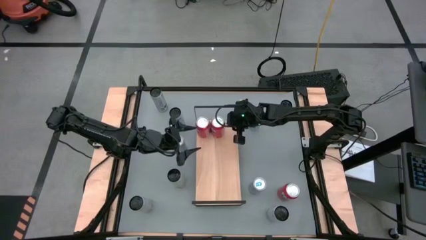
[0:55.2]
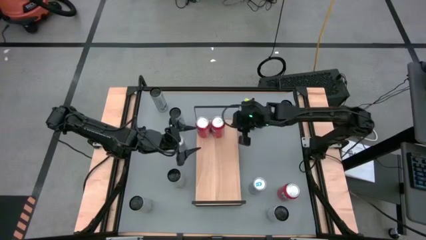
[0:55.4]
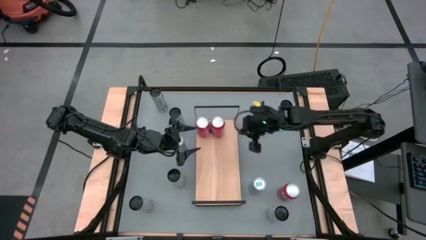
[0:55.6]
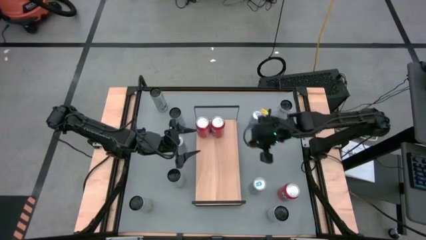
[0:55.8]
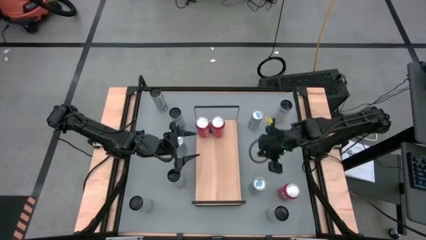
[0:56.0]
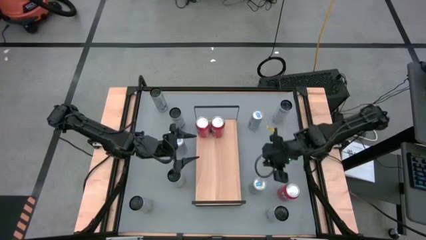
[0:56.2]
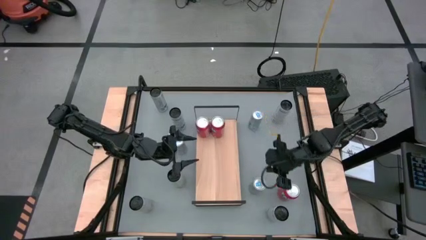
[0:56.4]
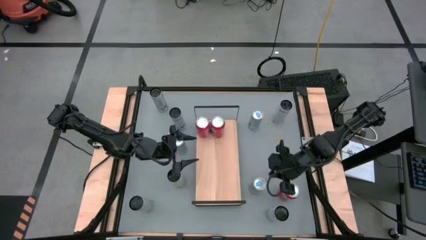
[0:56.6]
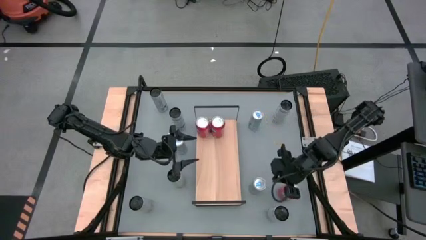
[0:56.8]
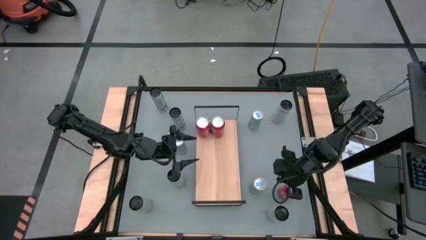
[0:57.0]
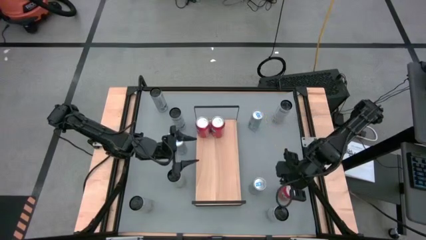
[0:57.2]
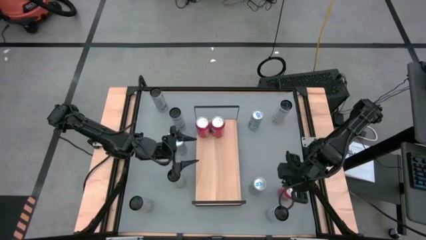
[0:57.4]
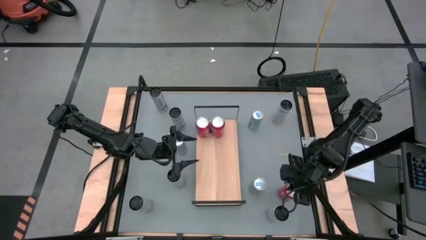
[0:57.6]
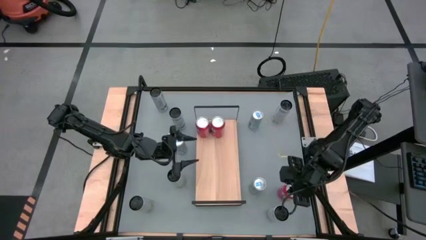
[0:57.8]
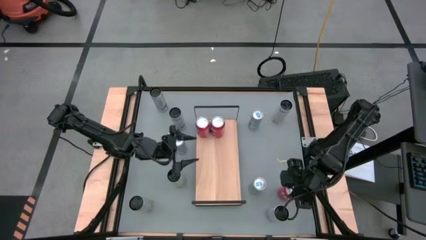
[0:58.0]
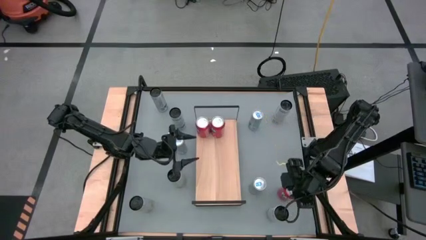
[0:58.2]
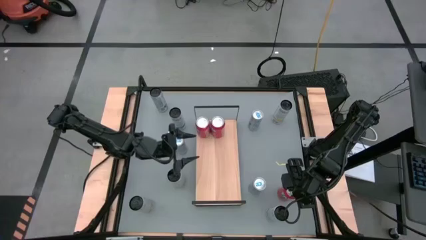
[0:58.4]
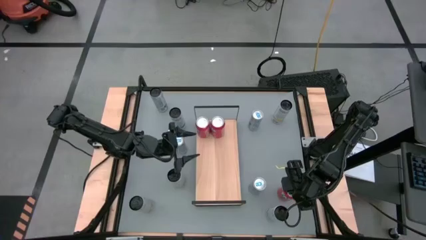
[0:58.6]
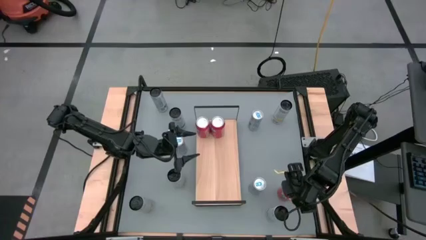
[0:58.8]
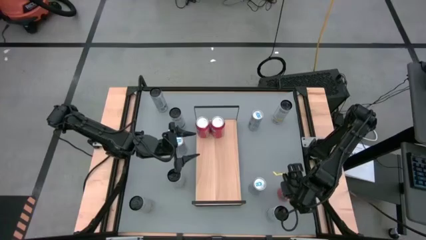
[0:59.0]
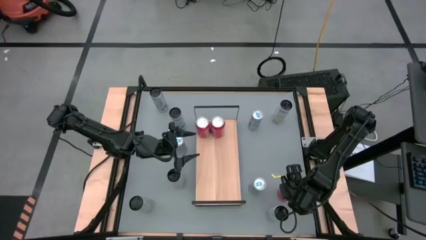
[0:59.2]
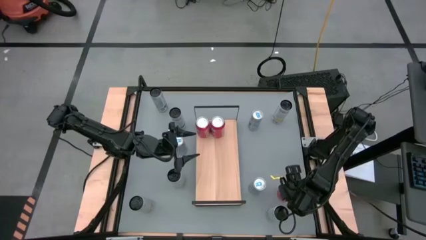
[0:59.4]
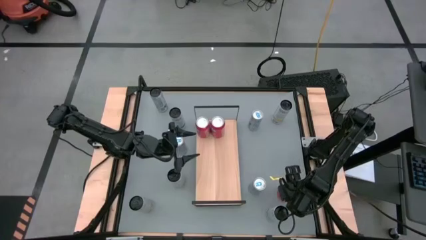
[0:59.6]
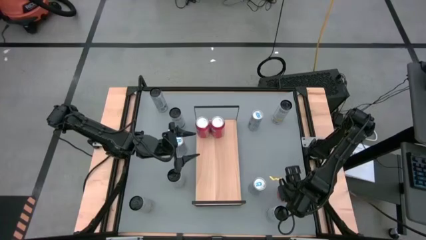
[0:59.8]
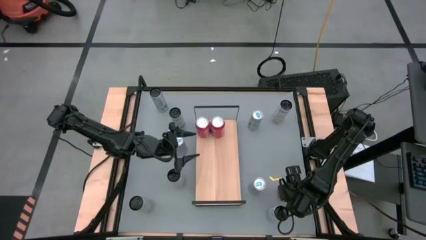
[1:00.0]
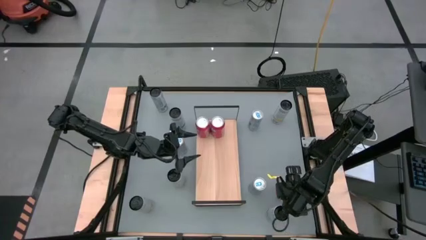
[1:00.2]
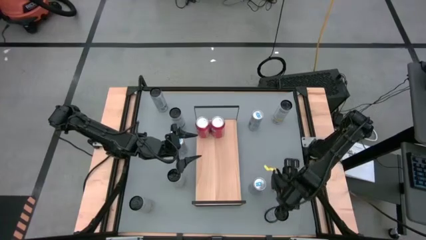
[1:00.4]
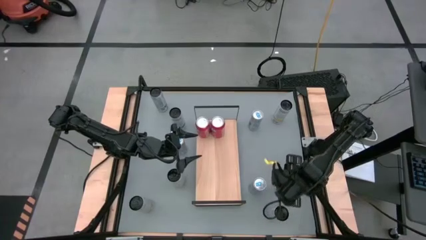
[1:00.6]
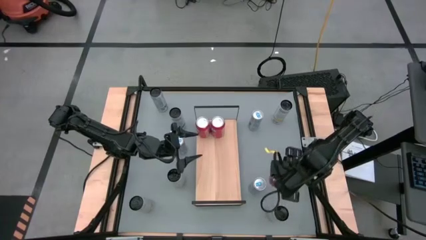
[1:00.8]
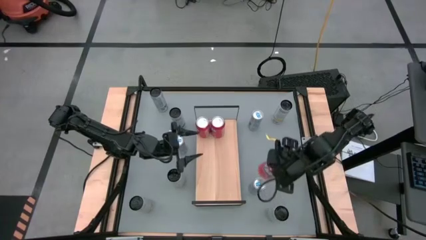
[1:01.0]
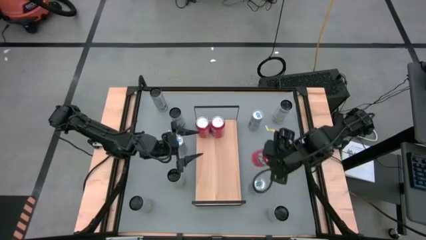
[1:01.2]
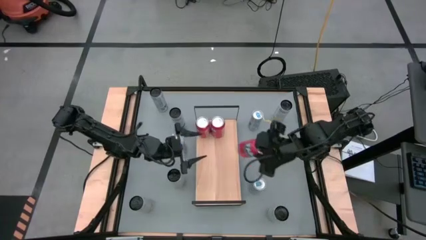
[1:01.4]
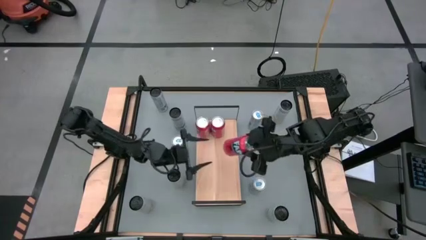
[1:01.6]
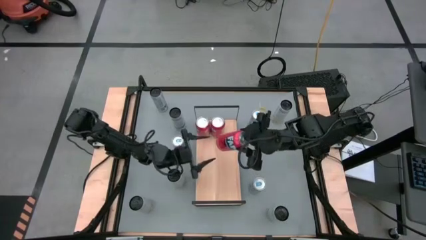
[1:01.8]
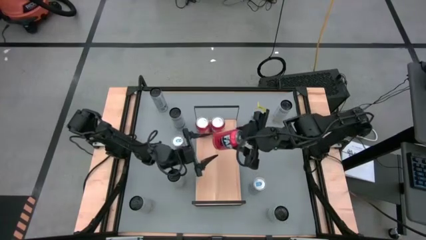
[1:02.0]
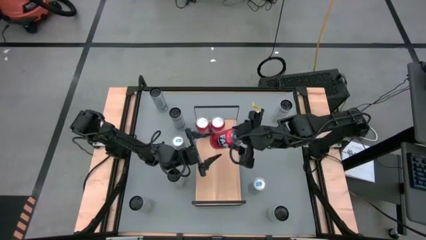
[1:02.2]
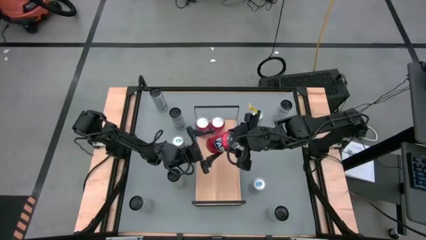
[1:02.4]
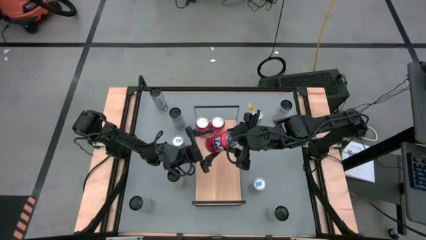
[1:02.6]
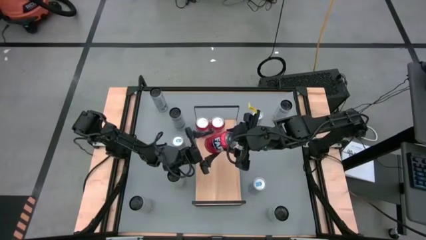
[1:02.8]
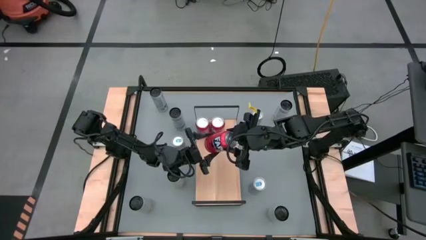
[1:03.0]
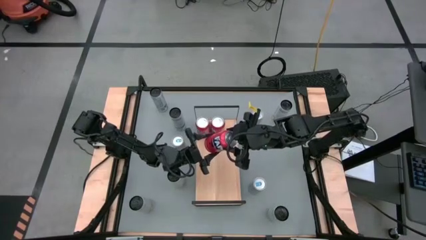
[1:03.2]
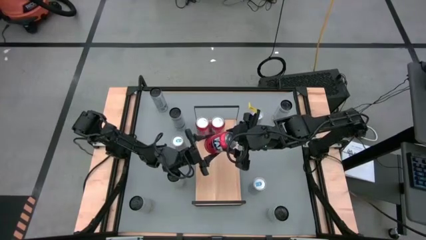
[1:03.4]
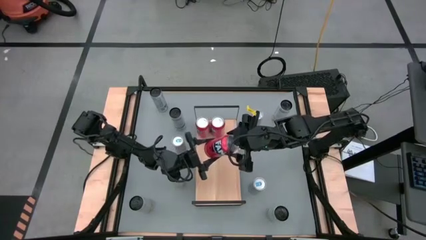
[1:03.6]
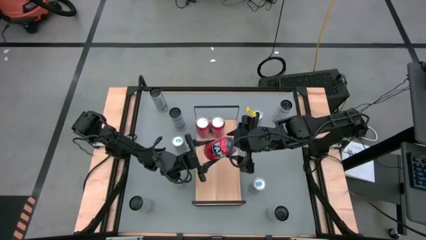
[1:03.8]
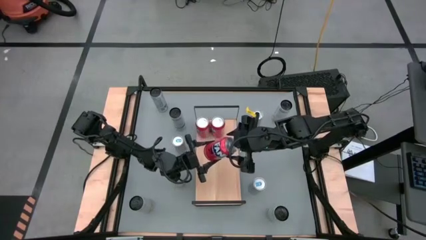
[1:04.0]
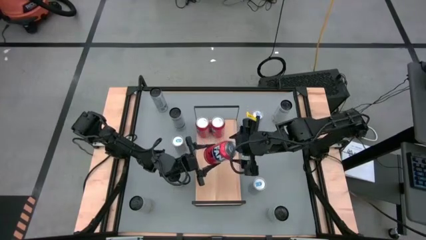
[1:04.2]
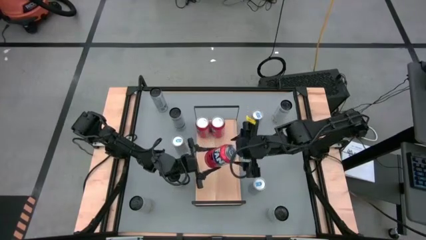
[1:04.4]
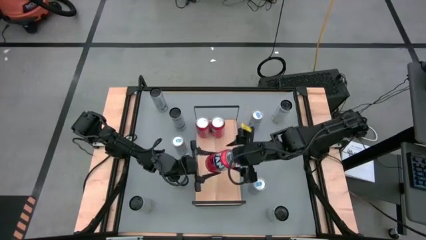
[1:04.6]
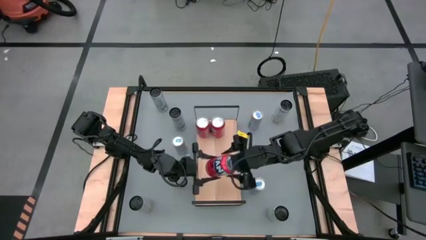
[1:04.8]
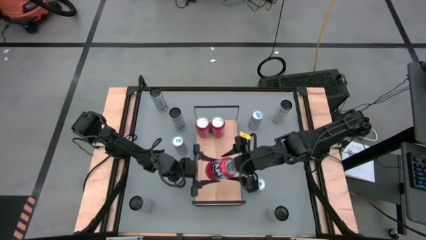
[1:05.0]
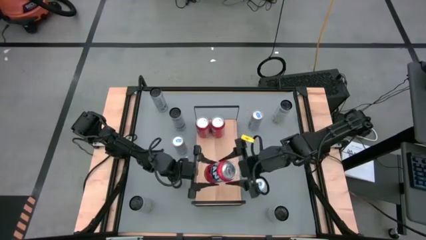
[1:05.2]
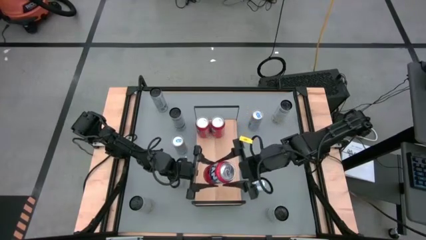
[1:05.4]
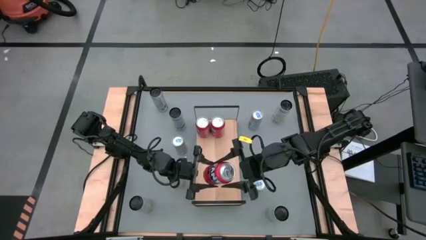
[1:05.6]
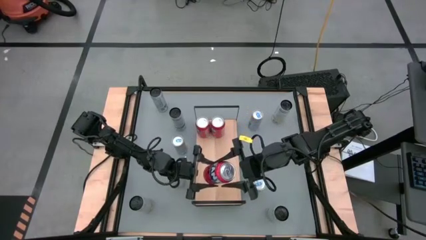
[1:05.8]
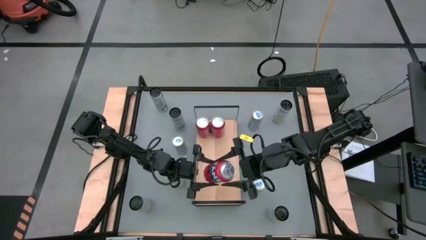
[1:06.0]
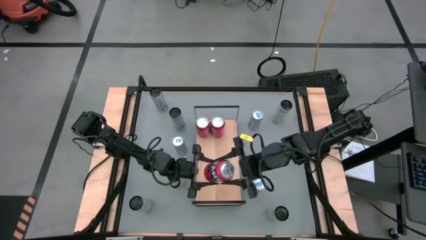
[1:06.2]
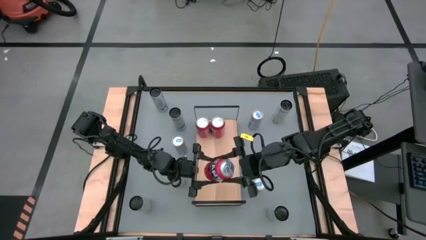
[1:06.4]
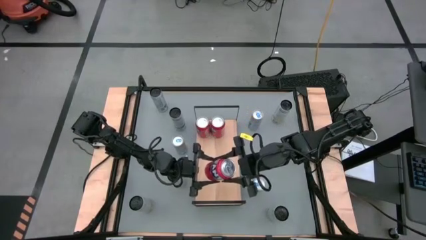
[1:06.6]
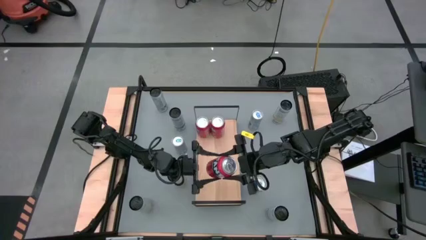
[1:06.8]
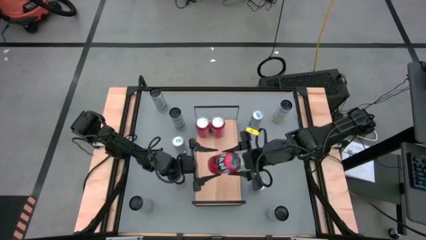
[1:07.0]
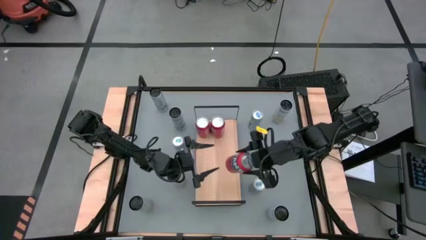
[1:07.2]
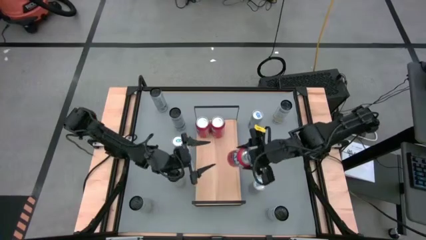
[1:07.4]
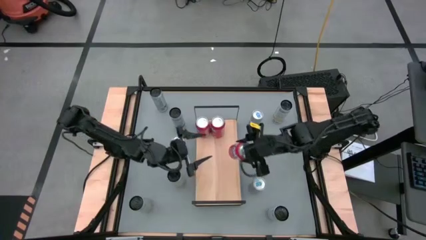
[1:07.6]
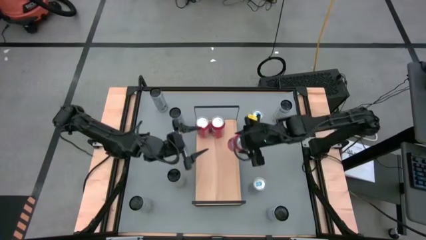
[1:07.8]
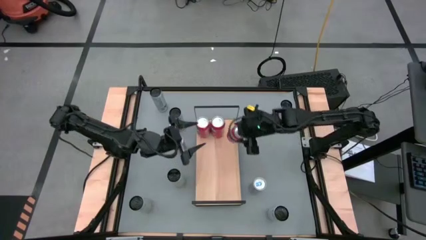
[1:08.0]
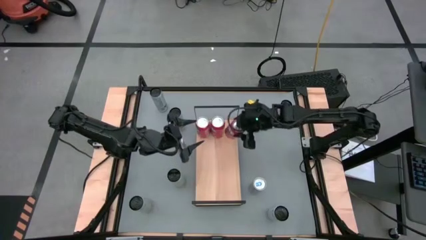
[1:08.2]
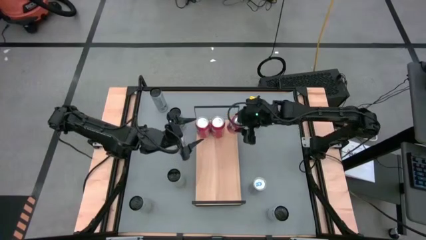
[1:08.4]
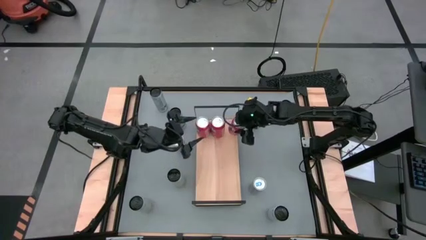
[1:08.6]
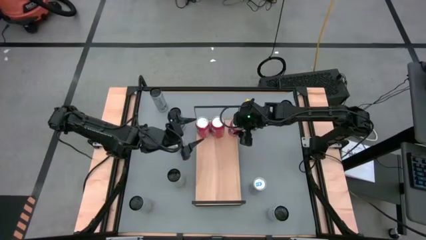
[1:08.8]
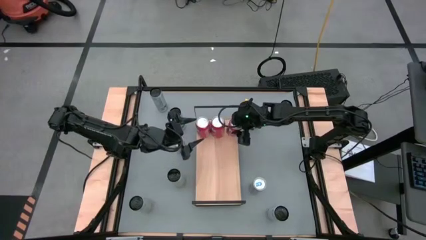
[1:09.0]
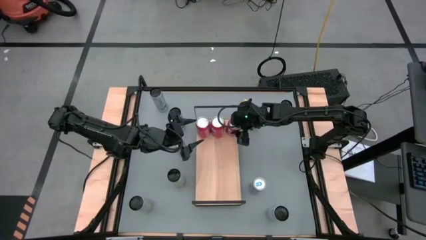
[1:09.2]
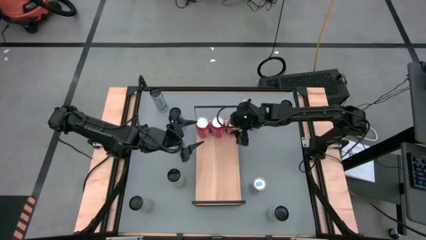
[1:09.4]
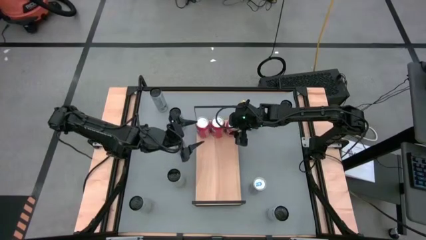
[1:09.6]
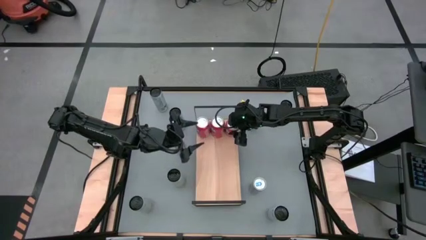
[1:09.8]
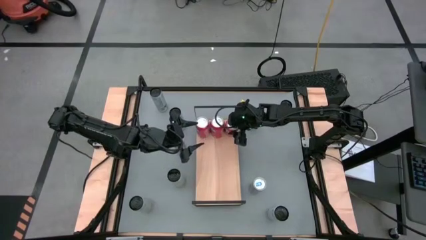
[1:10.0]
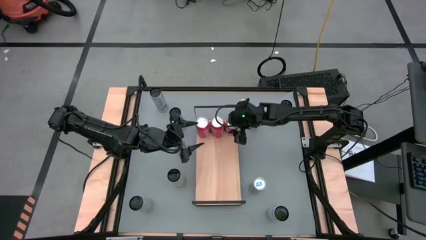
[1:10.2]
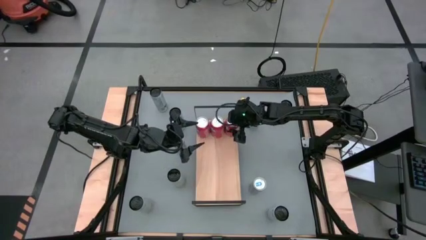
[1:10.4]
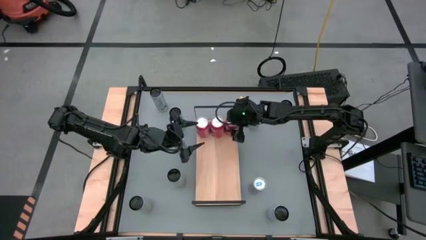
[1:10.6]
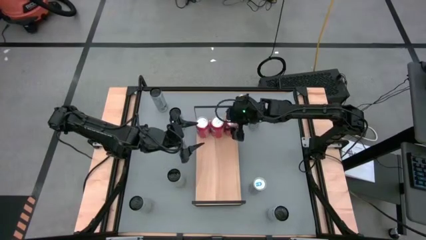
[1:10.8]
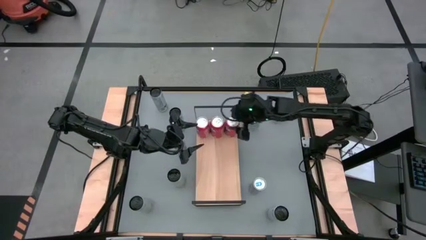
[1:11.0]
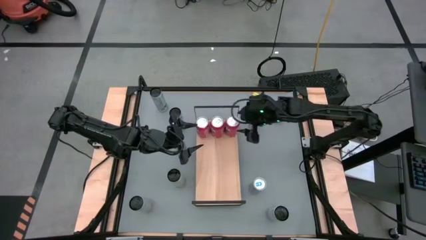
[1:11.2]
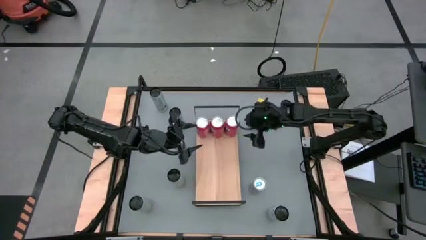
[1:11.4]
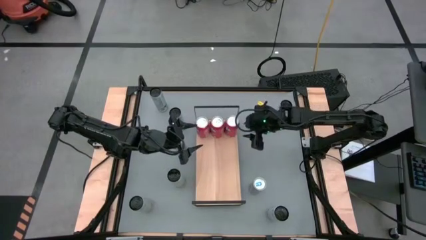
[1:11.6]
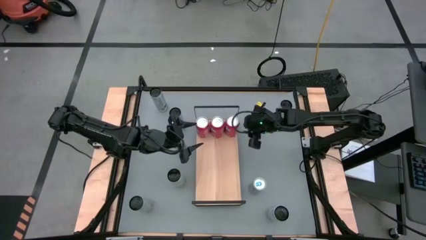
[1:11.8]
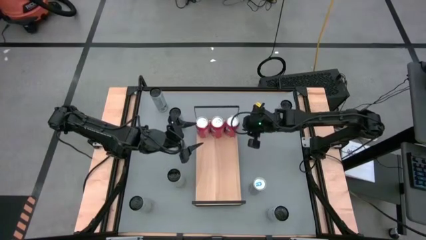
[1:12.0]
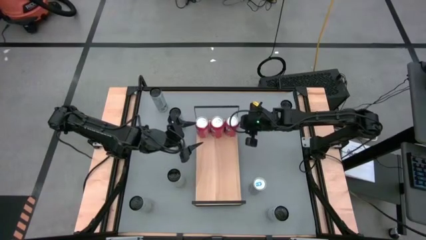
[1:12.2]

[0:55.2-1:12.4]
Task: Place canned beverage on shelf
Put the red soda can on the shelf aligned with the other red soda cans on the shelf
